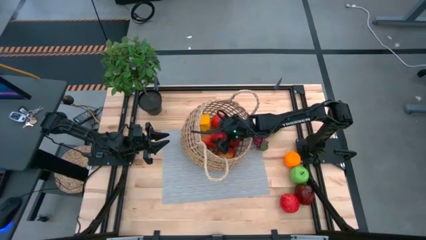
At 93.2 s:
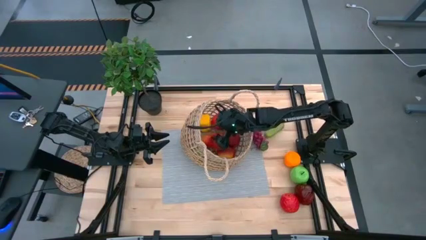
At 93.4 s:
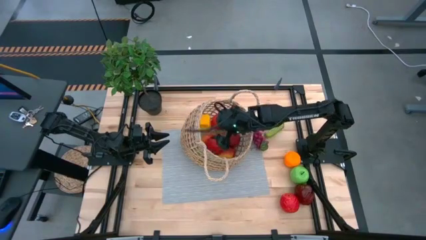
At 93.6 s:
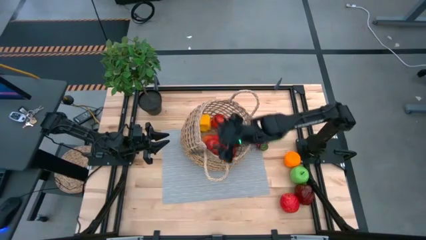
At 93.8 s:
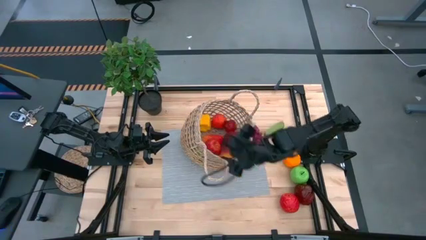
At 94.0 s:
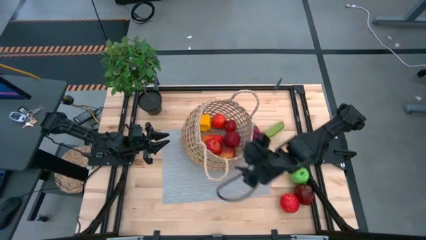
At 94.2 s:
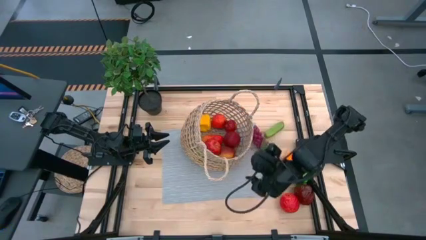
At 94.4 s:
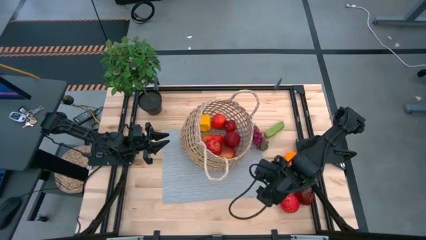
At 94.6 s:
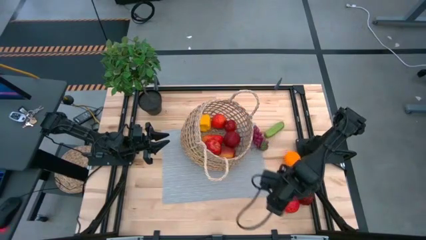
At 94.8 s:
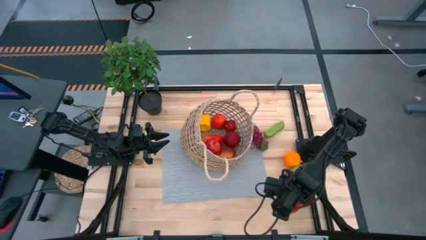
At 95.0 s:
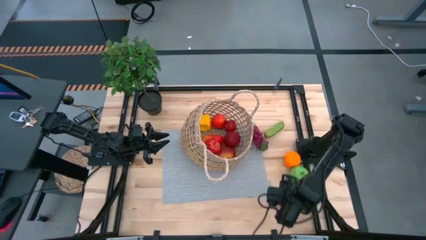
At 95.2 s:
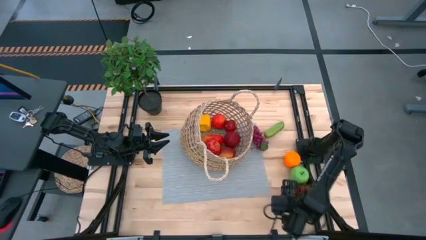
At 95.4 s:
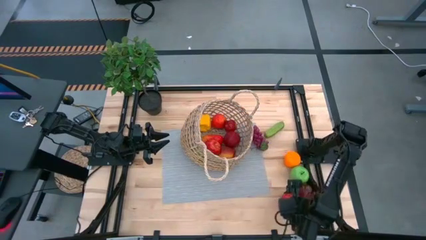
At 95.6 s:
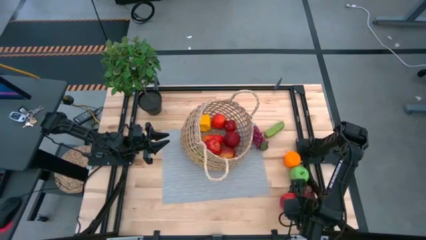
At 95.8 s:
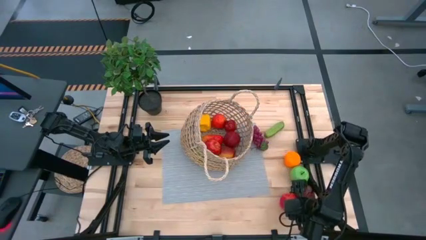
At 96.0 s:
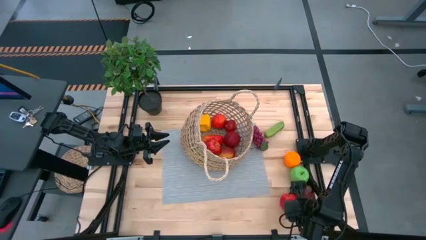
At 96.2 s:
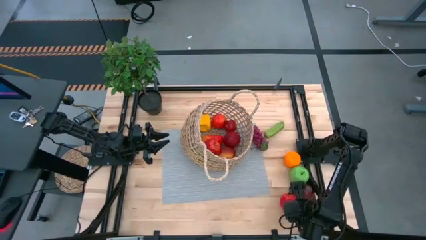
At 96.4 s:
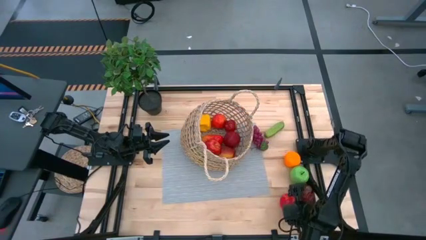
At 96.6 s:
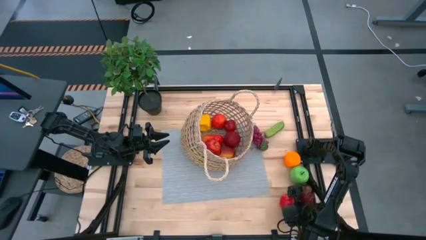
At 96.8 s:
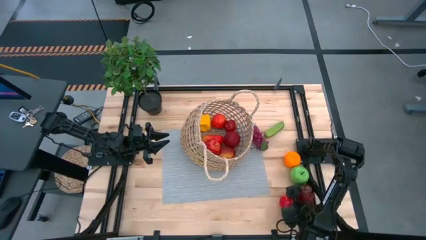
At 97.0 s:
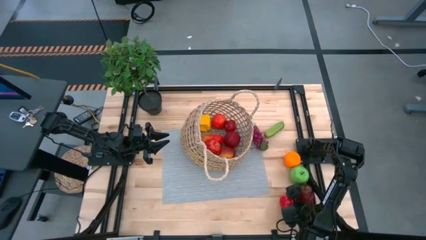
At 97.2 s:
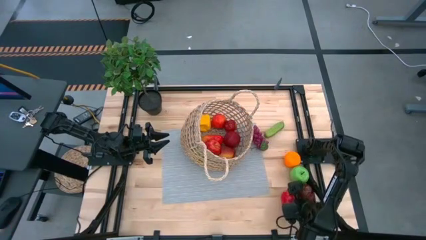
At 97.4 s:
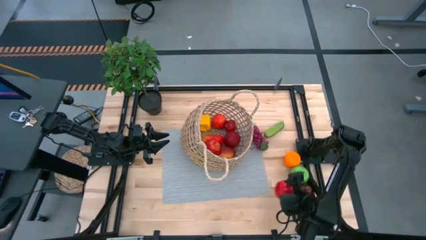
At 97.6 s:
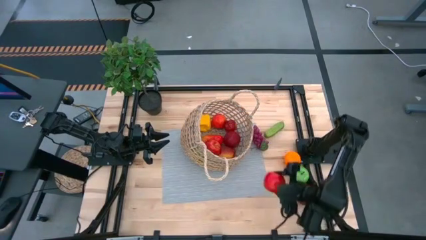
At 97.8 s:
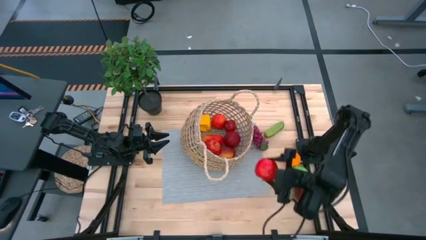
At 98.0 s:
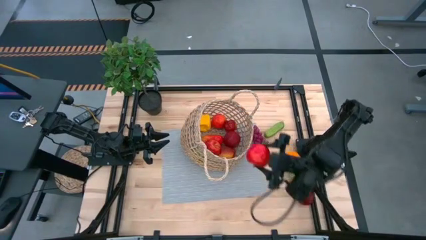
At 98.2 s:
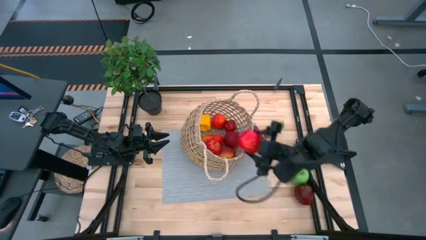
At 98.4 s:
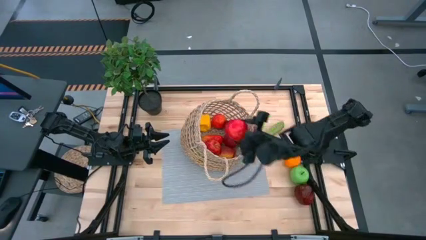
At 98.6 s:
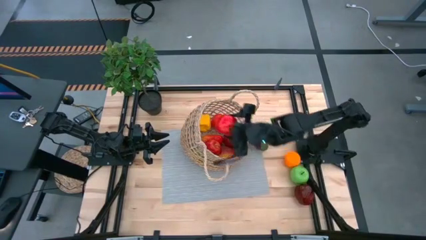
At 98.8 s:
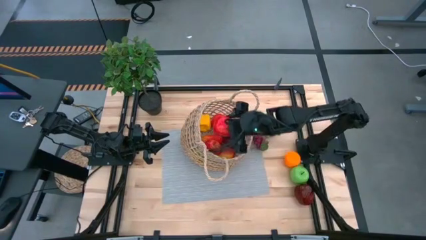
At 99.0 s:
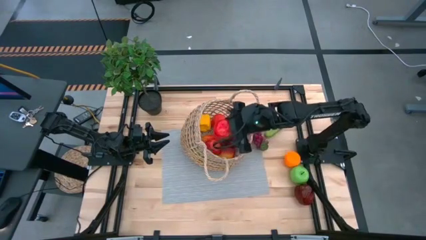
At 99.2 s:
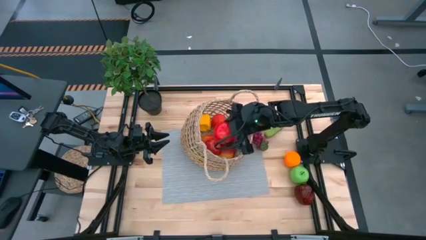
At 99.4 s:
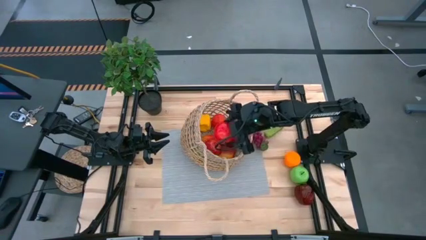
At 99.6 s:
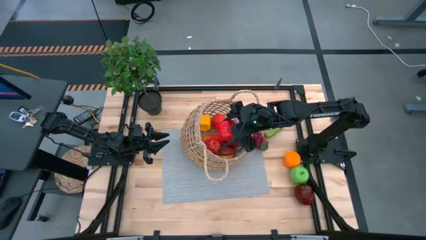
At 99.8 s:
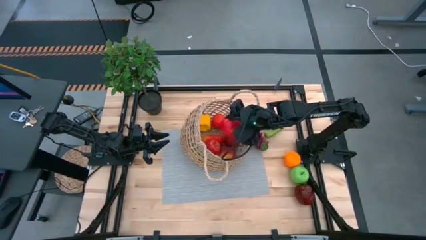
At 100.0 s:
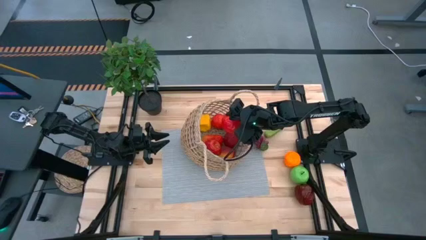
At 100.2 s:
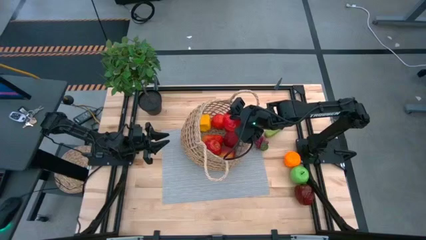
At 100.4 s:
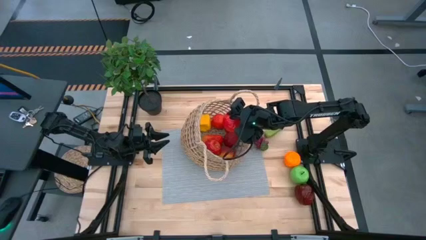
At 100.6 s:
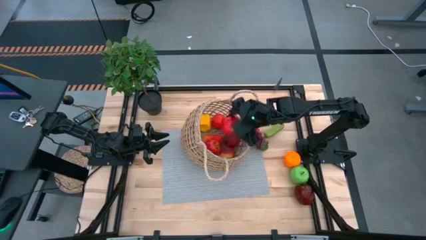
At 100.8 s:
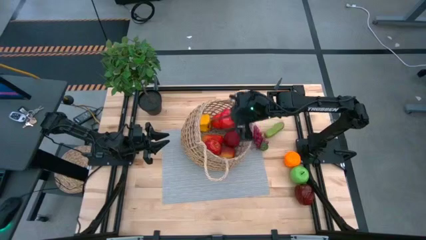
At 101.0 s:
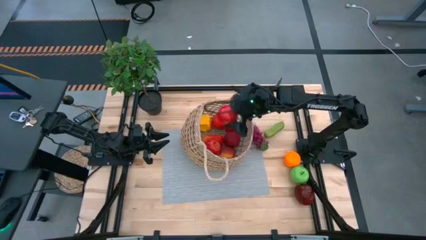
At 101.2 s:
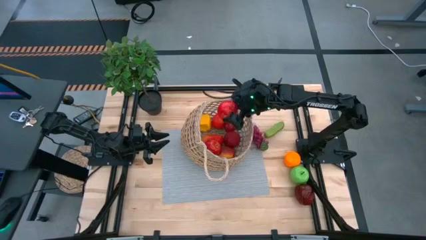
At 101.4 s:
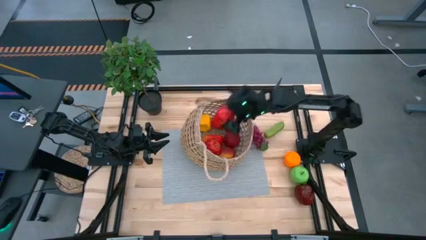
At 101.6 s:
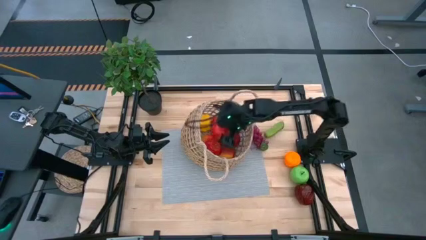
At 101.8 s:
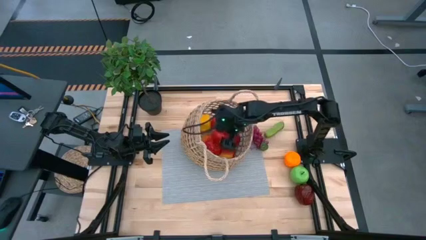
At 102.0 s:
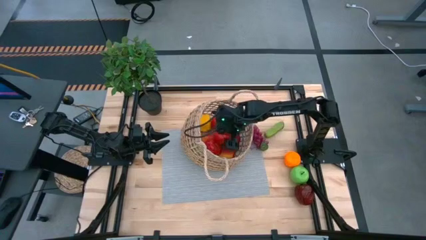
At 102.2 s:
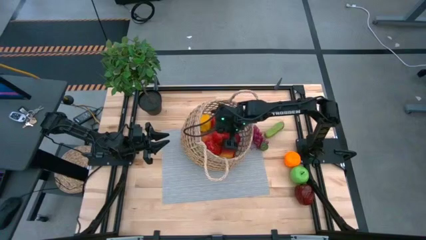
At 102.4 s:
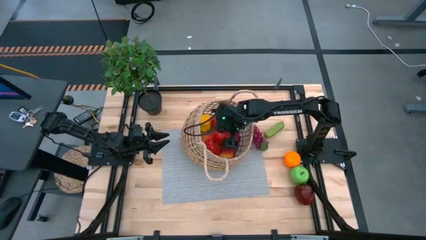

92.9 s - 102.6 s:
Task: Build produce basket
Put the red apple into the brown basket

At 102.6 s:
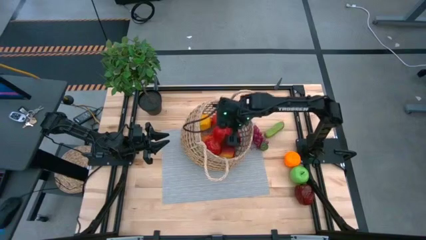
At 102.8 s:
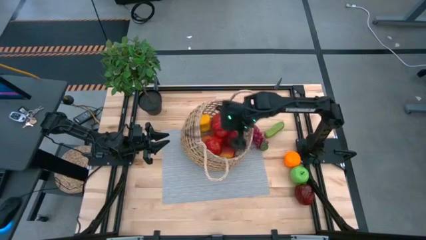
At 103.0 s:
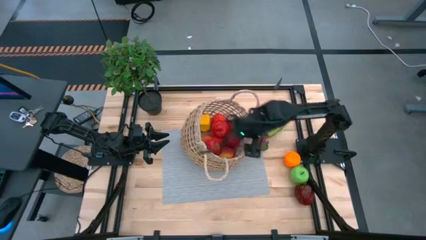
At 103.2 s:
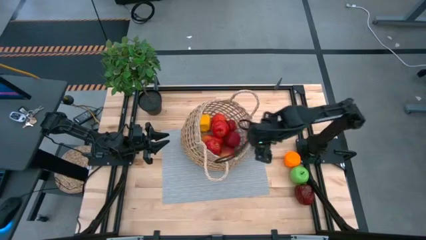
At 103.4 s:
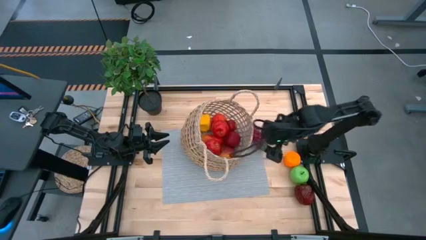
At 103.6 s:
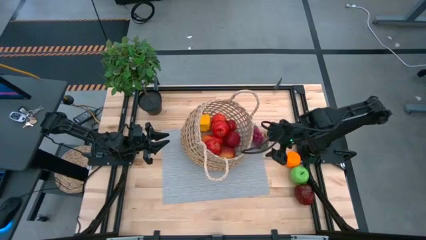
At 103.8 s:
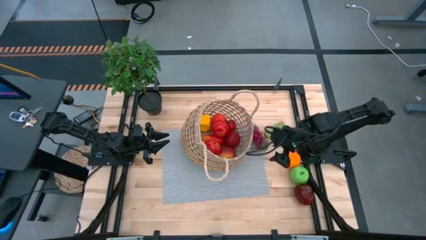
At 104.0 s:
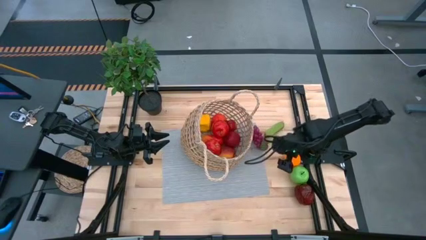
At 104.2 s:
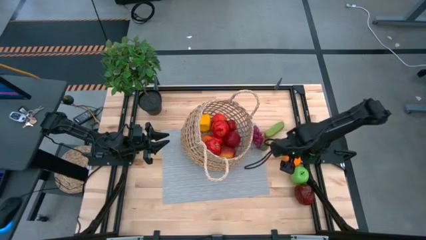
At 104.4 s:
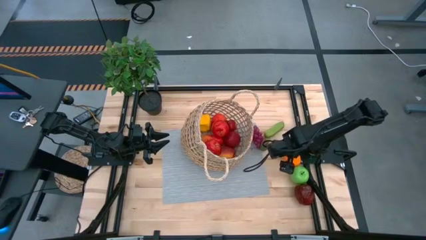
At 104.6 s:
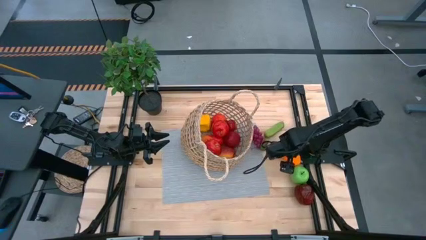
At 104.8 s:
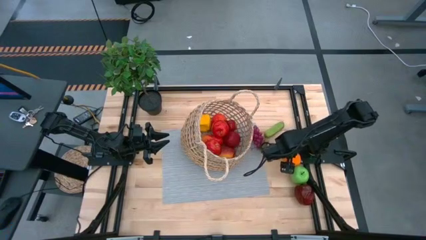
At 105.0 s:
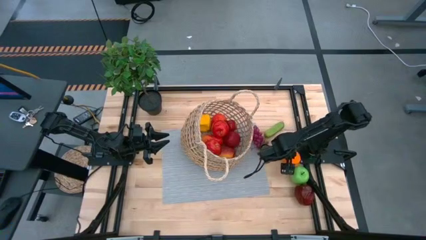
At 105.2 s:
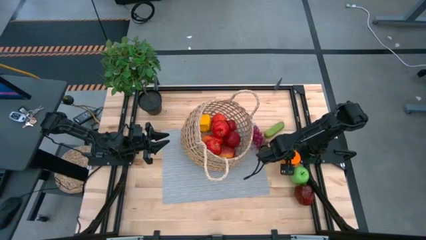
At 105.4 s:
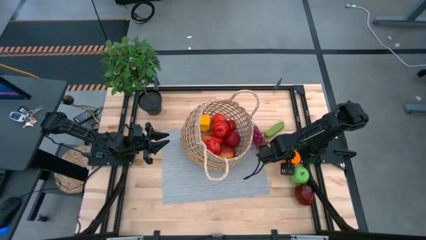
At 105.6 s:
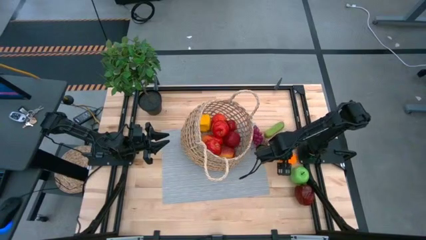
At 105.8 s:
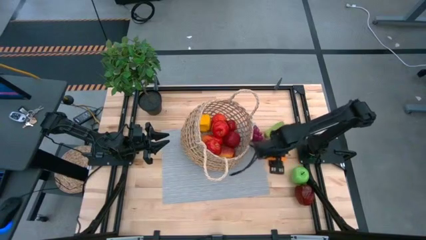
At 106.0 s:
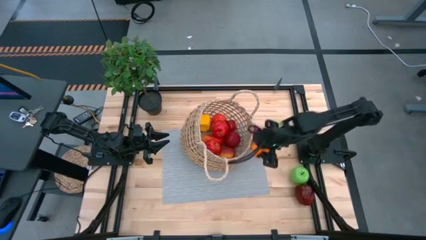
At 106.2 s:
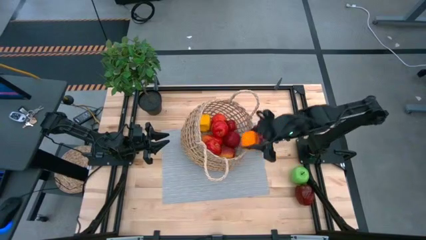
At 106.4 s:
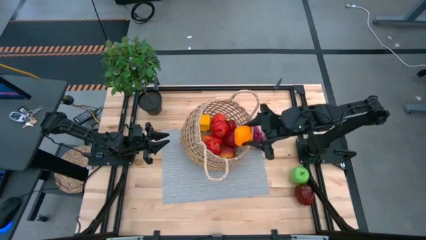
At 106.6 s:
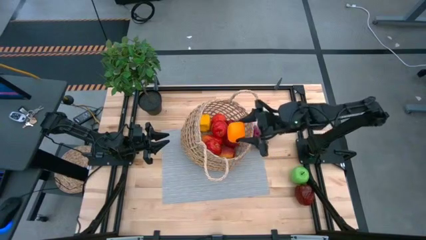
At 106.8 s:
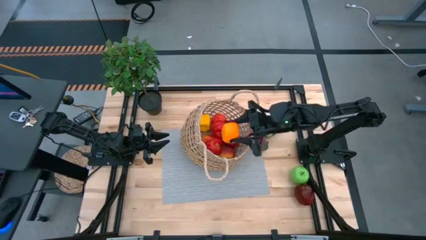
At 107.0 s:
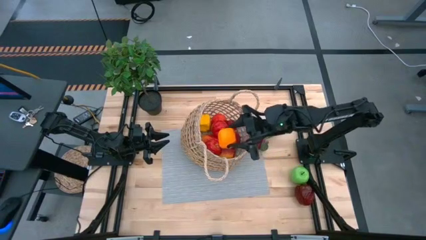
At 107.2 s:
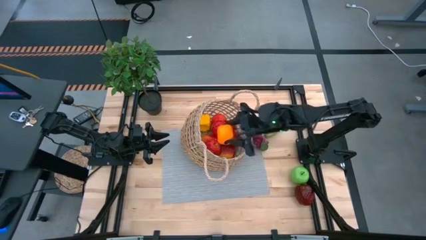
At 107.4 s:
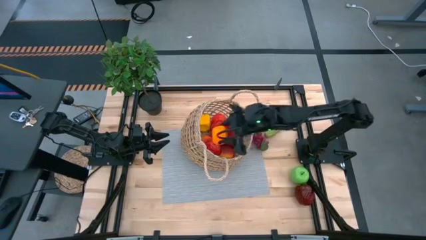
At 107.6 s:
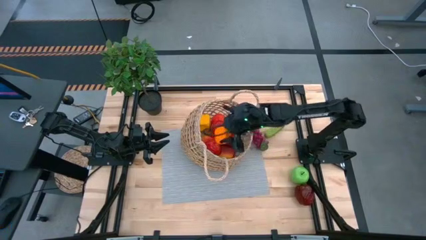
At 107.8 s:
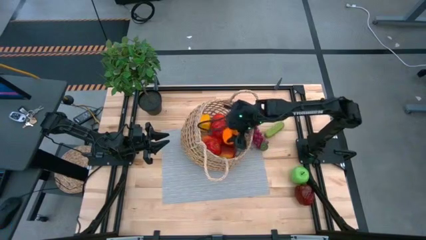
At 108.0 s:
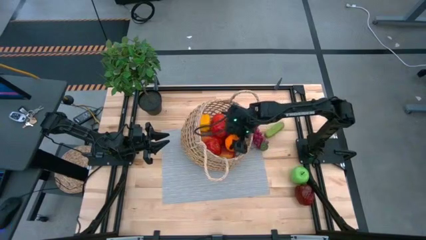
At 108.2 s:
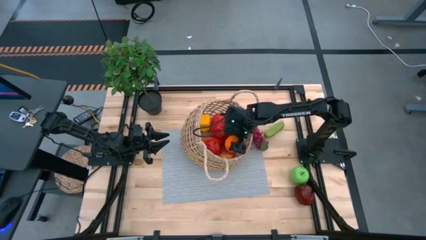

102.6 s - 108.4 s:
Put the orange into the brown basket
